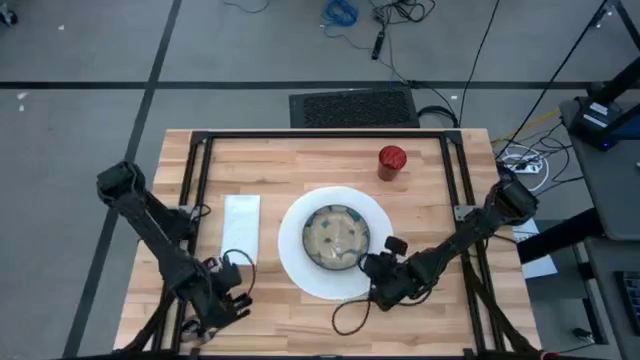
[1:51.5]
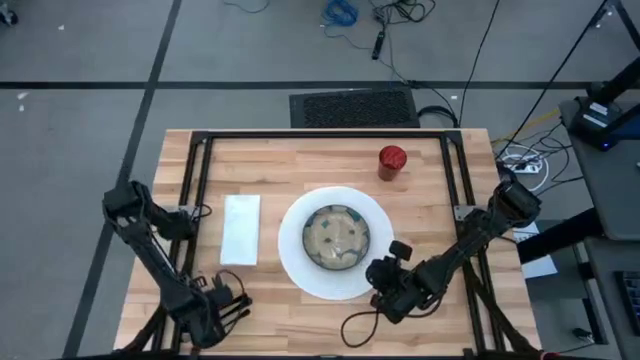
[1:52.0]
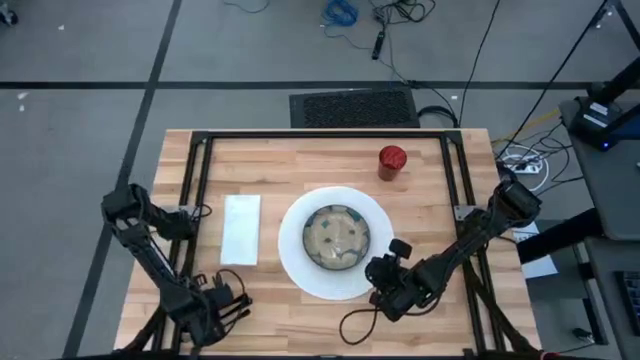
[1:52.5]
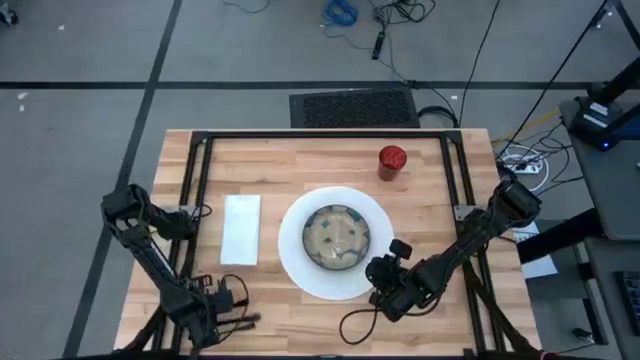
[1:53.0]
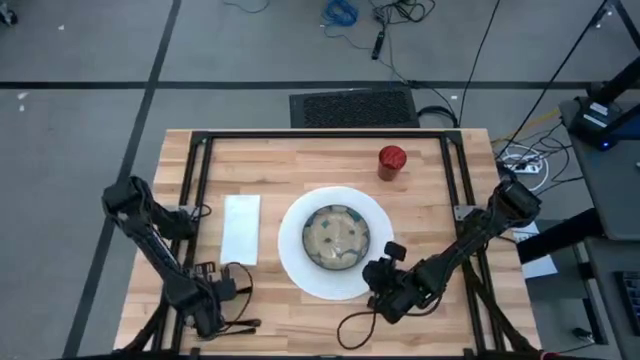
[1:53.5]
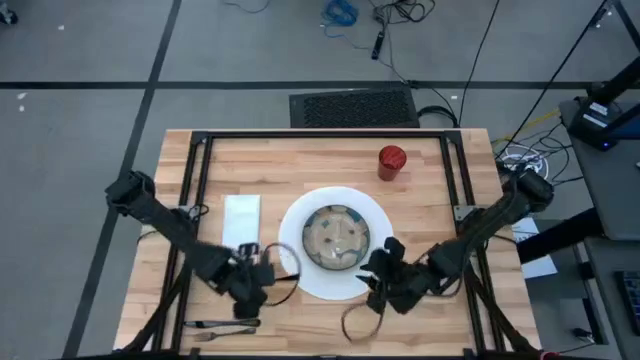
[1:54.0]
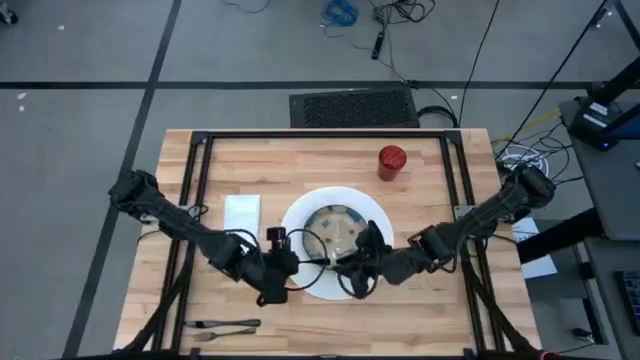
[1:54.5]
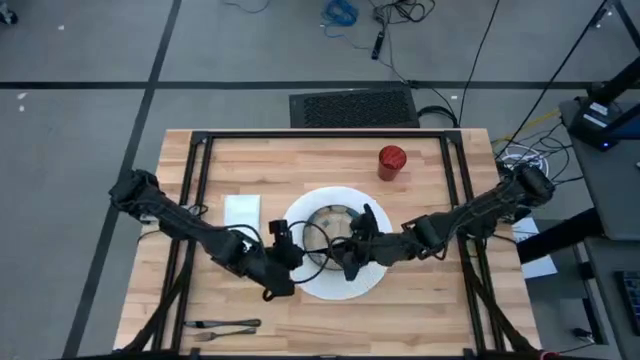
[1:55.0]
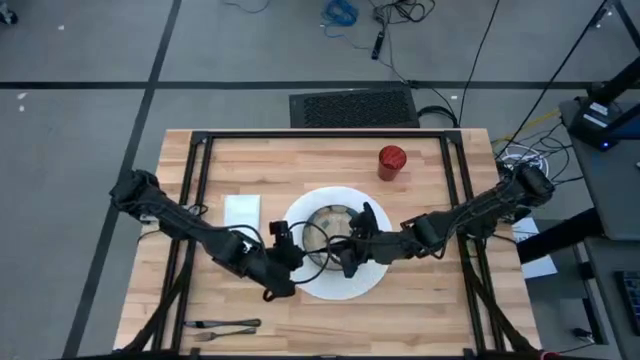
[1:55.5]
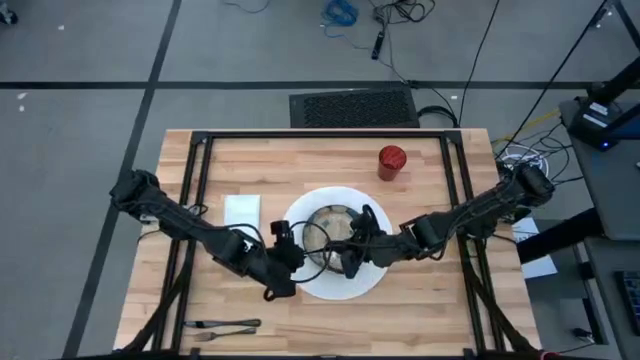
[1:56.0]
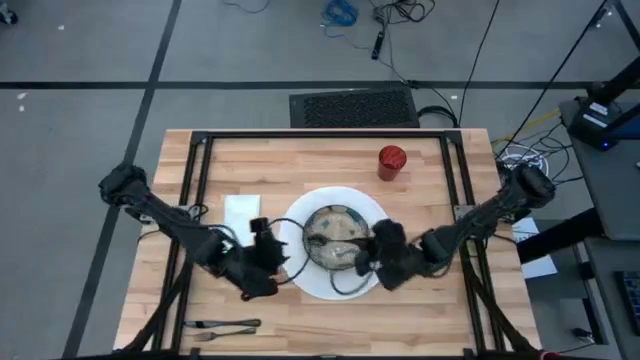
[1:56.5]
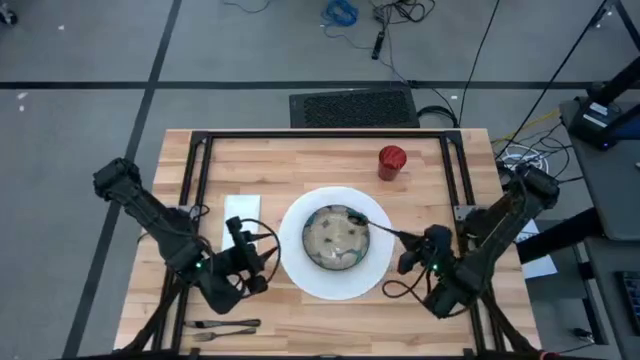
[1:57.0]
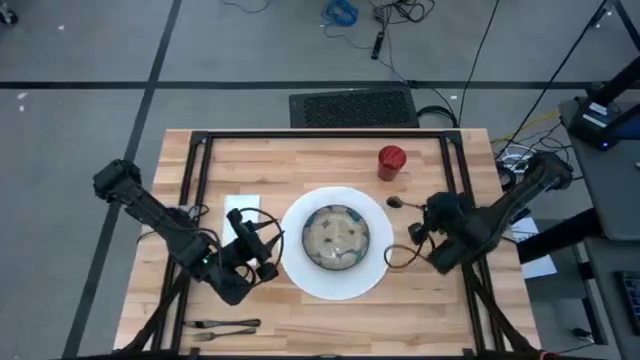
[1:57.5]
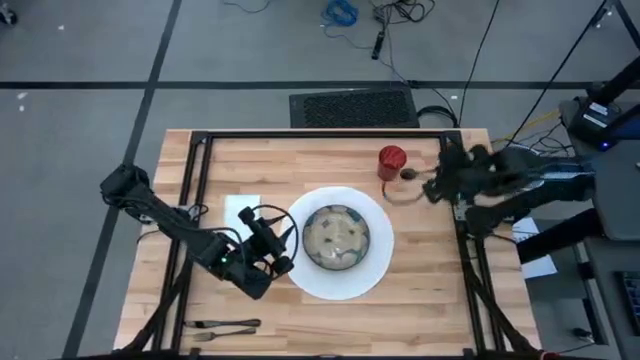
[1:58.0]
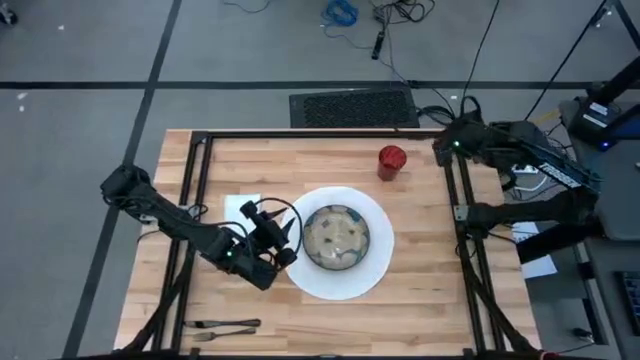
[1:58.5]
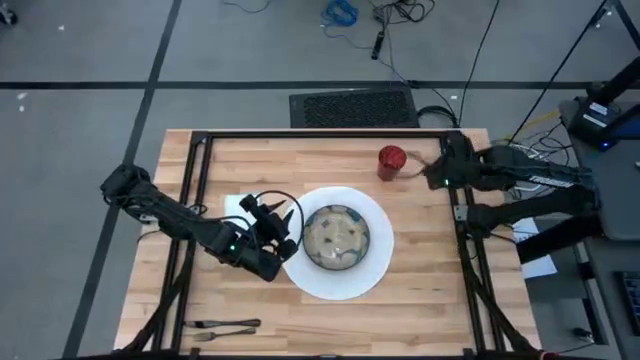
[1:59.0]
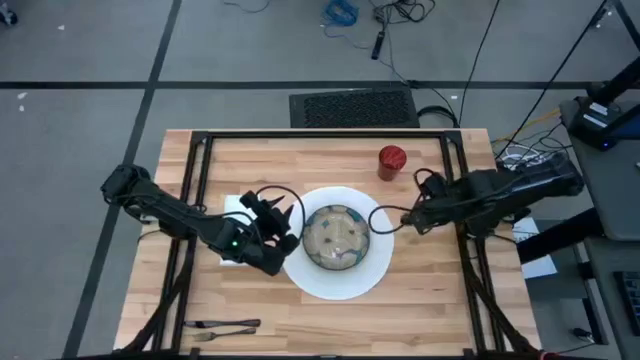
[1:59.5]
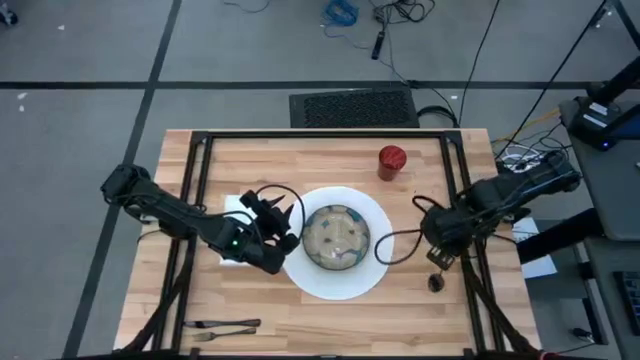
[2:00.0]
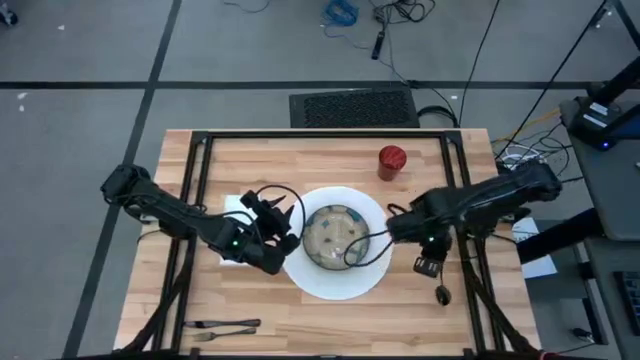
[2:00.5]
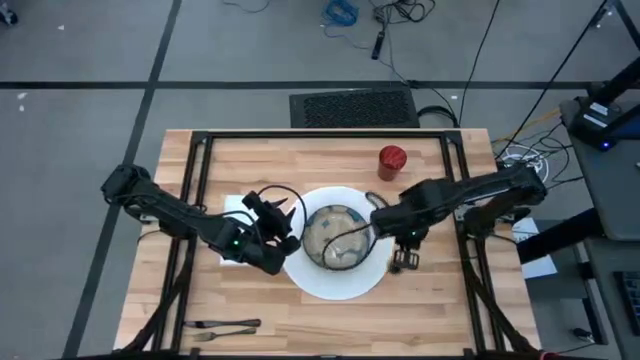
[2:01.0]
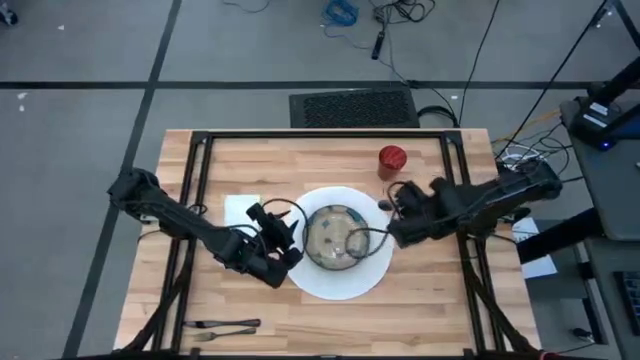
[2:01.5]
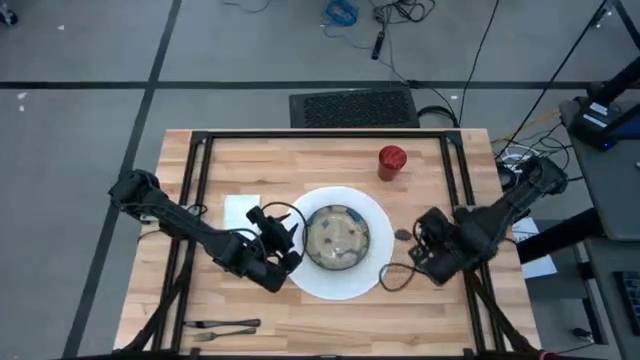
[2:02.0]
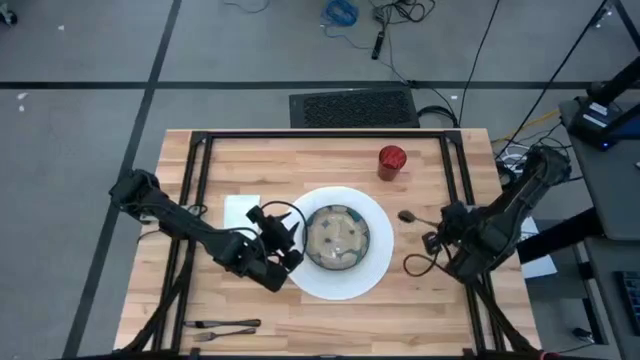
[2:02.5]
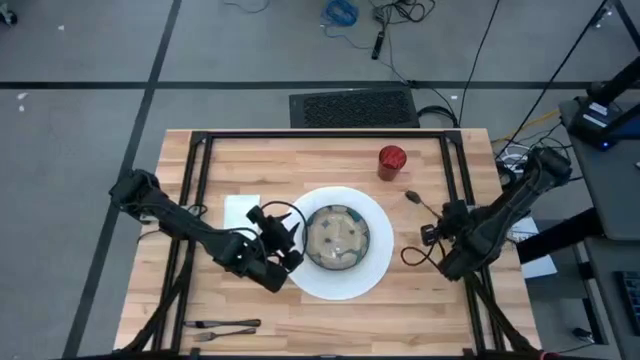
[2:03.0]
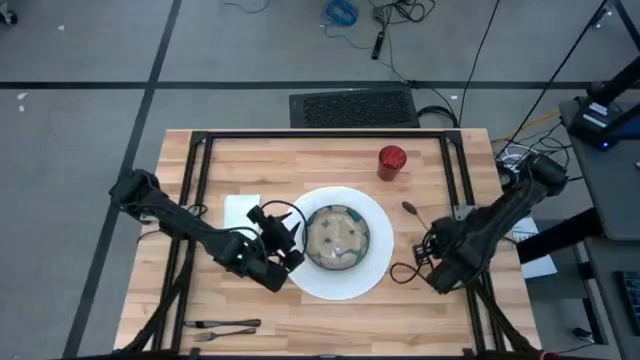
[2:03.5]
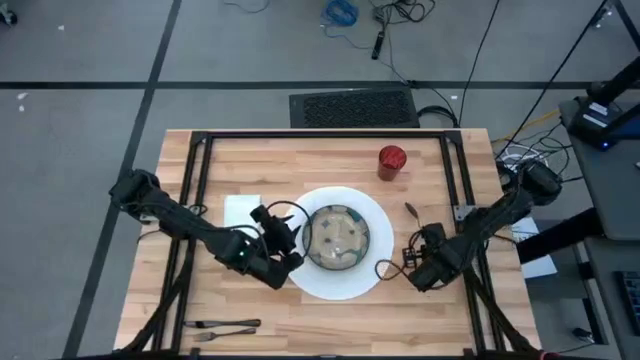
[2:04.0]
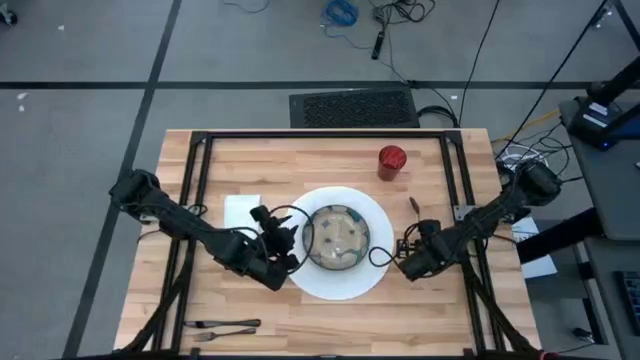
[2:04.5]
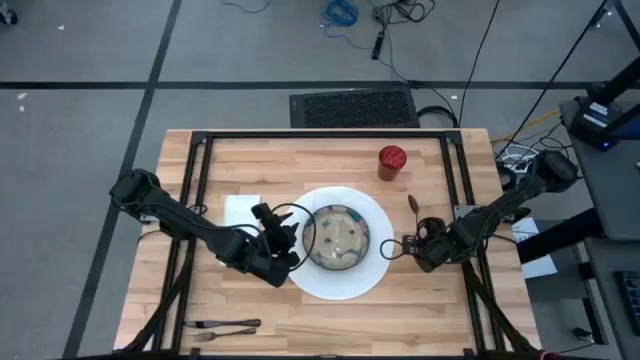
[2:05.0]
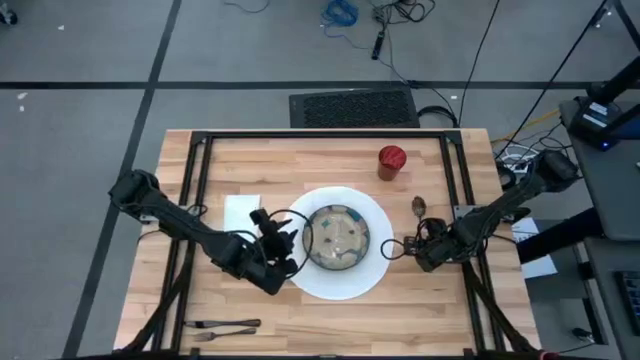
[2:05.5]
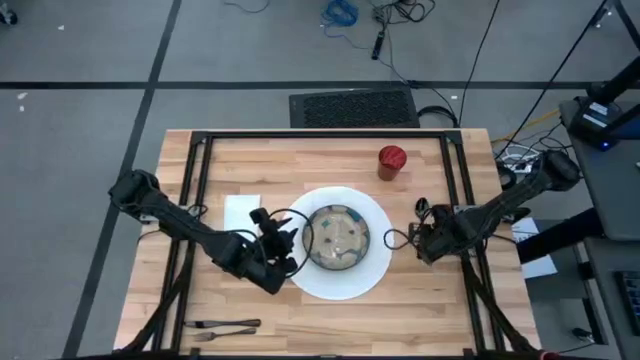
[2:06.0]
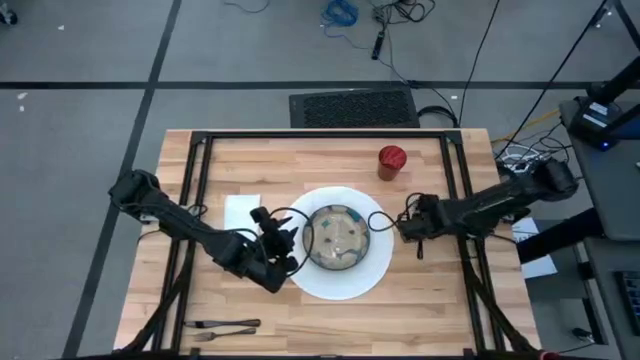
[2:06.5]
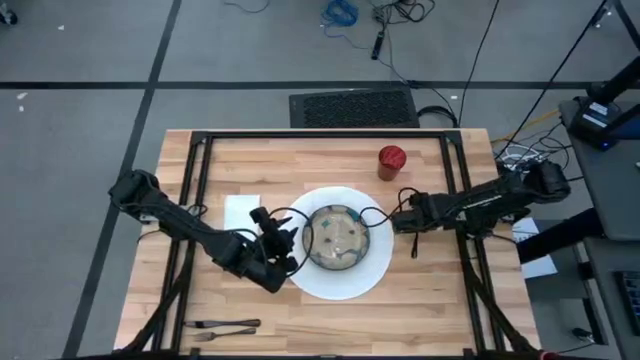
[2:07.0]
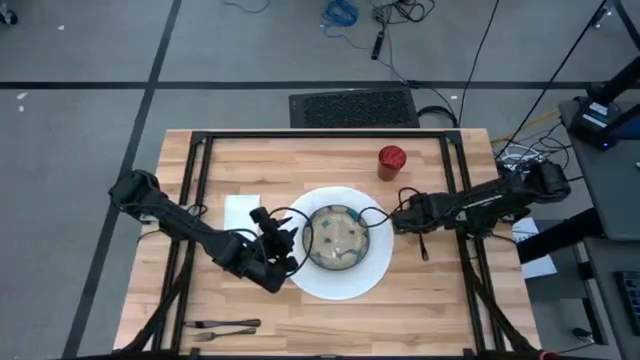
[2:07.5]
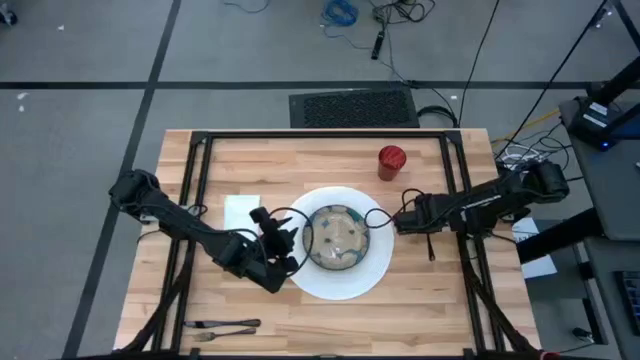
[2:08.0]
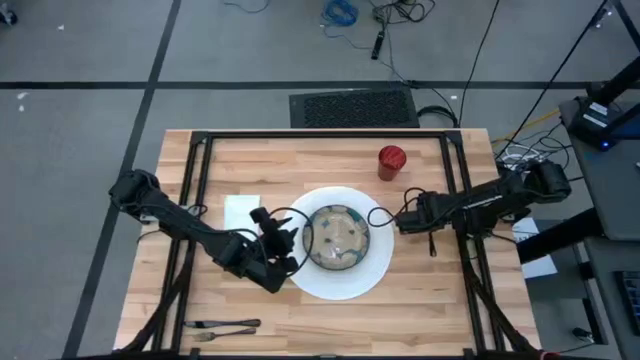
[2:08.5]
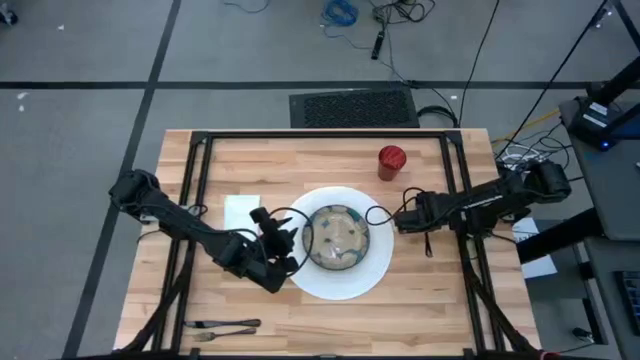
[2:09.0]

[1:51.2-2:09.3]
Task: Set table place
Move the black spoon to the middle right of the table

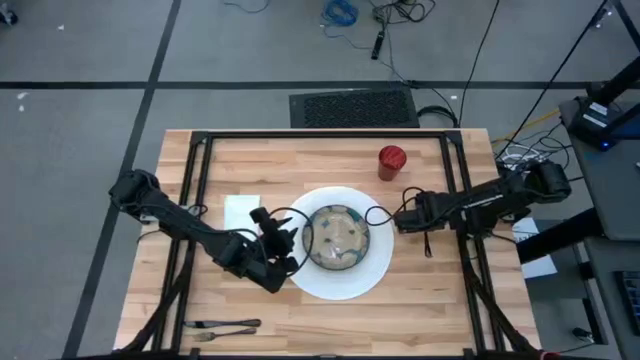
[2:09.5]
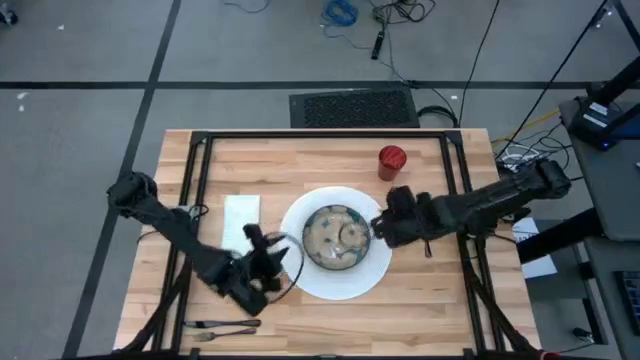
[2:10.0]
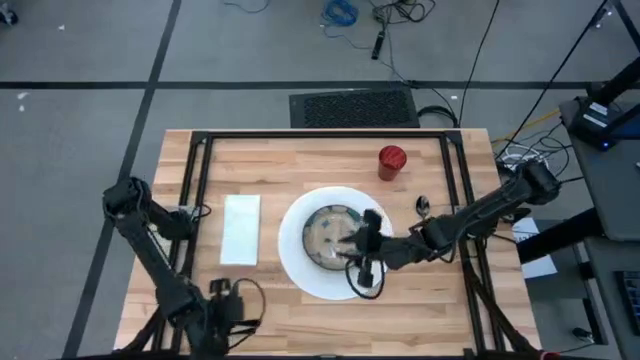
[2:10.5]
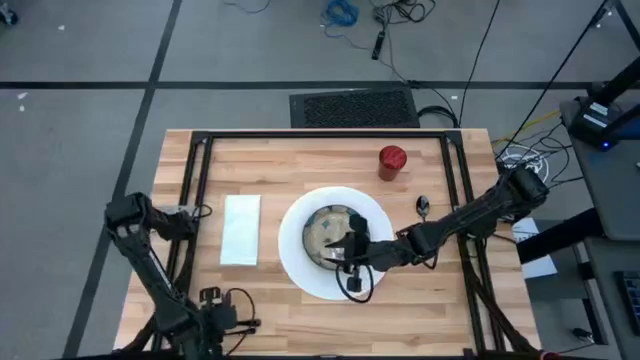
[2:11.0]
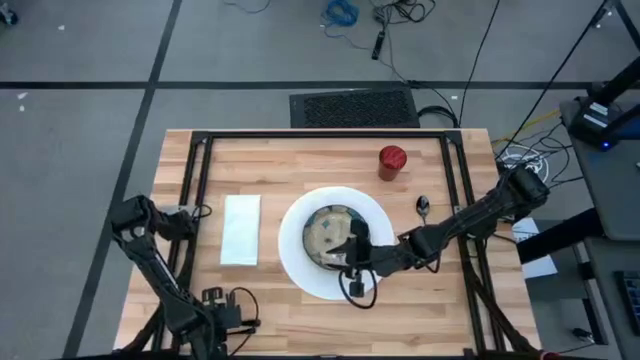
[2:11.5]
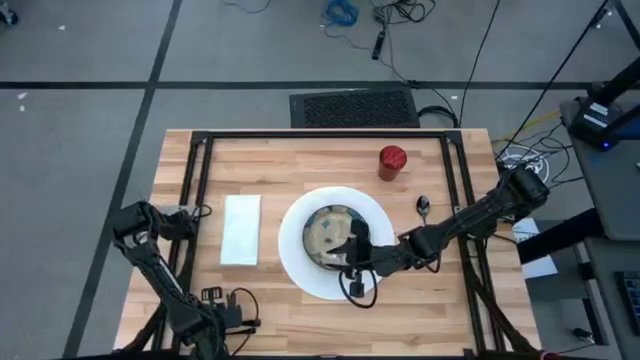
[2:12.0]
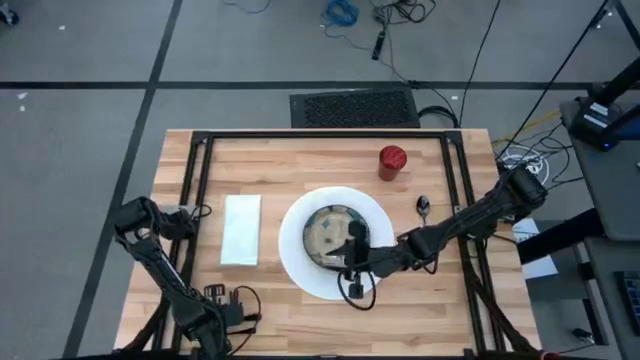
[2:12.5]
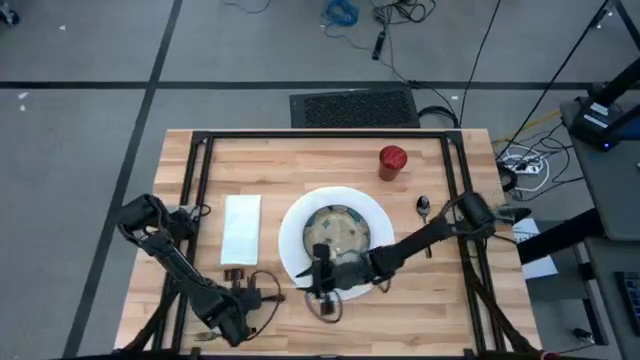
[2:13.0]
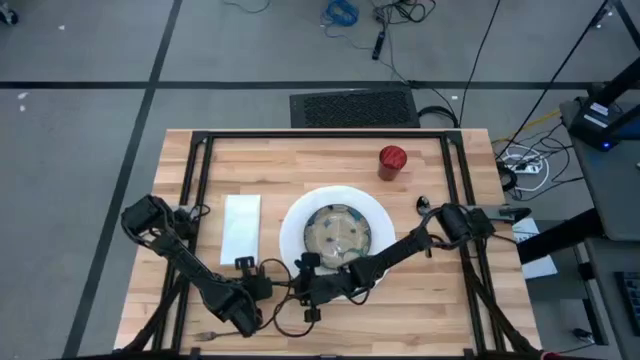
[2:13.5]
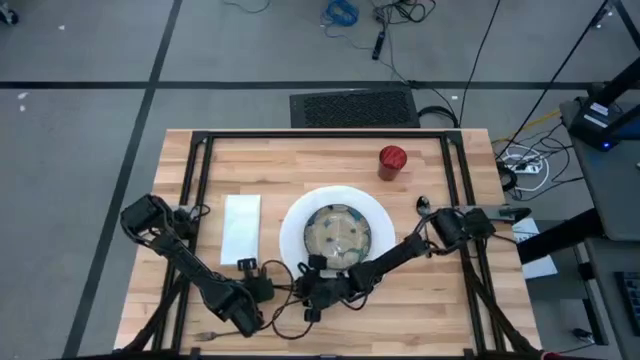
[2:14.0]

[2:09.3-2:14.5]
Move the black knife to the middle right of the table
